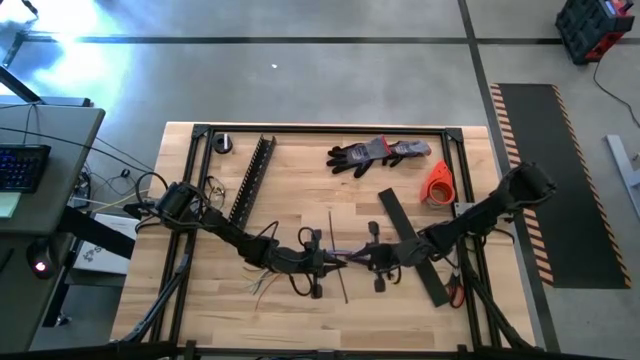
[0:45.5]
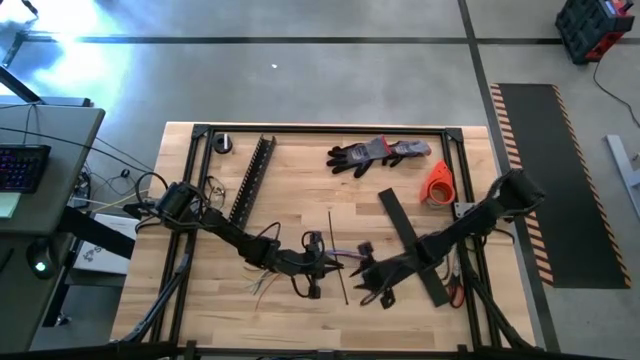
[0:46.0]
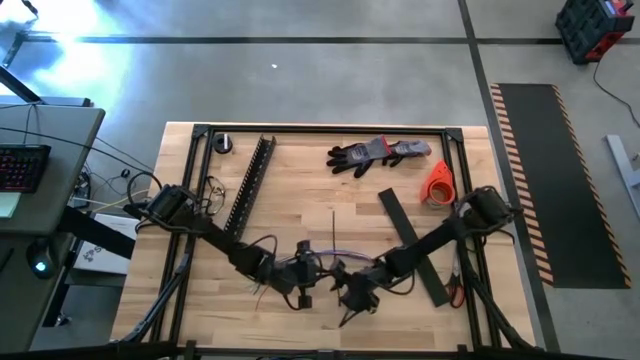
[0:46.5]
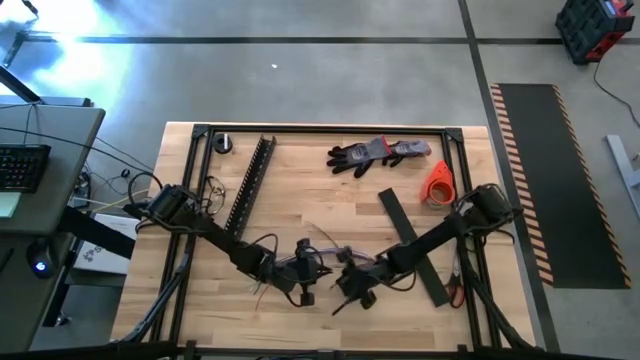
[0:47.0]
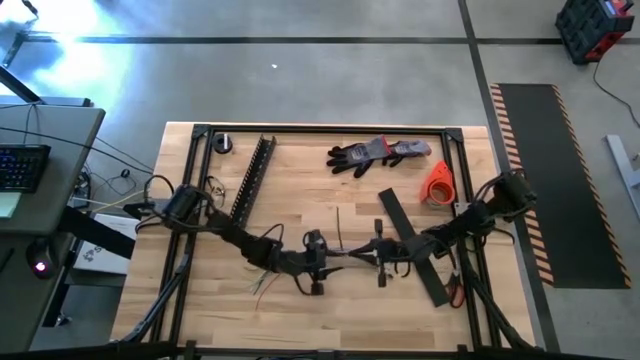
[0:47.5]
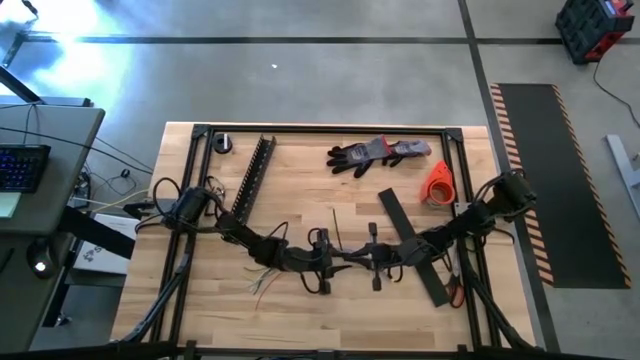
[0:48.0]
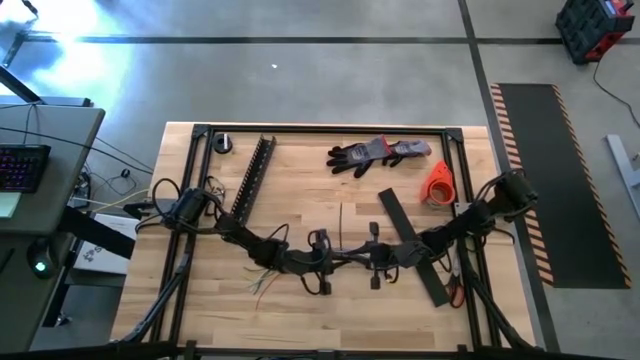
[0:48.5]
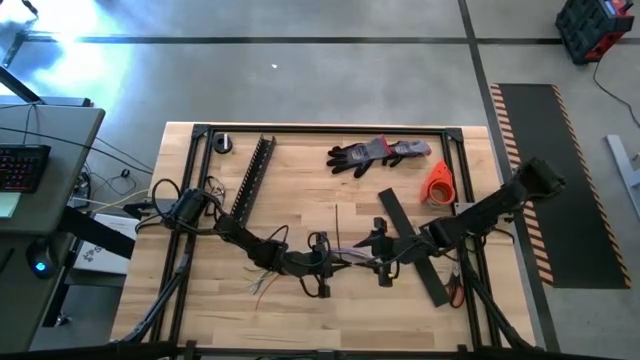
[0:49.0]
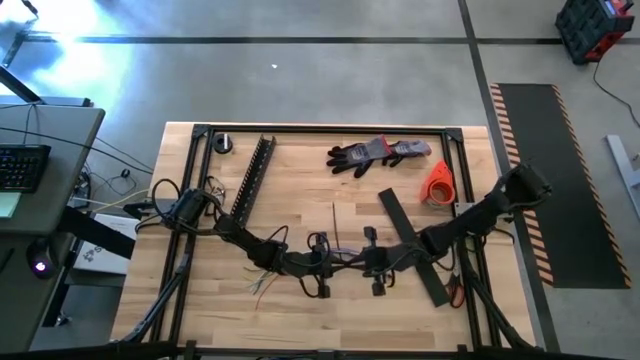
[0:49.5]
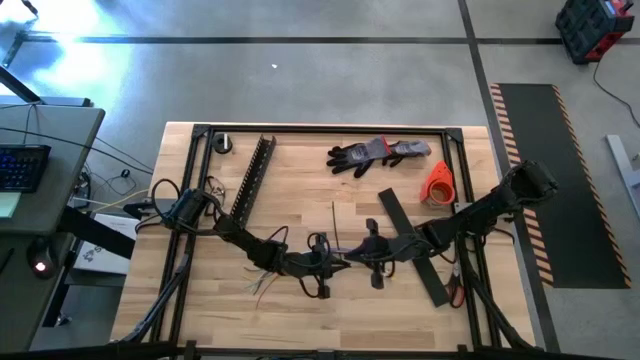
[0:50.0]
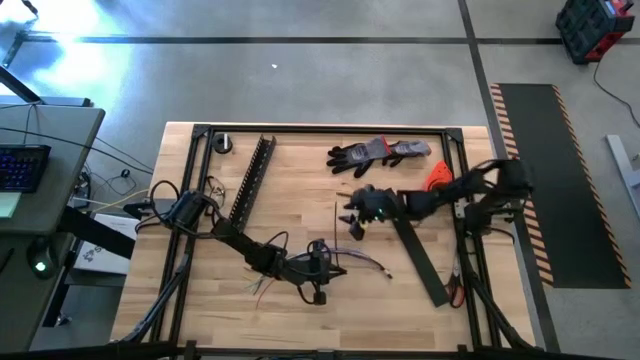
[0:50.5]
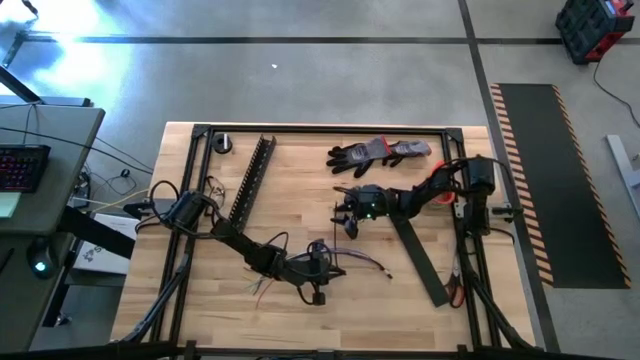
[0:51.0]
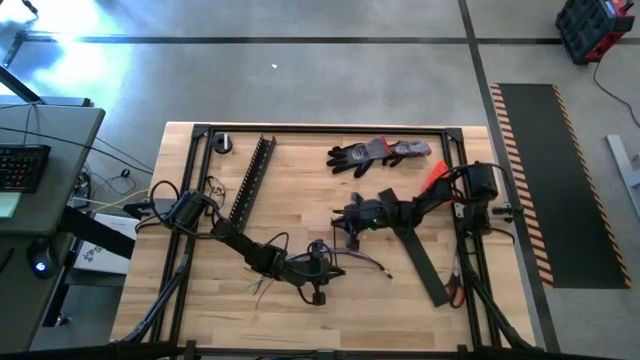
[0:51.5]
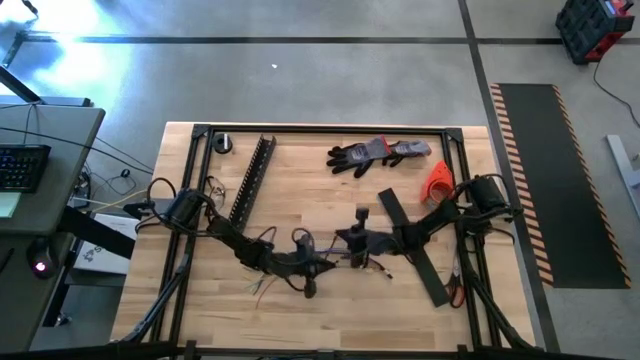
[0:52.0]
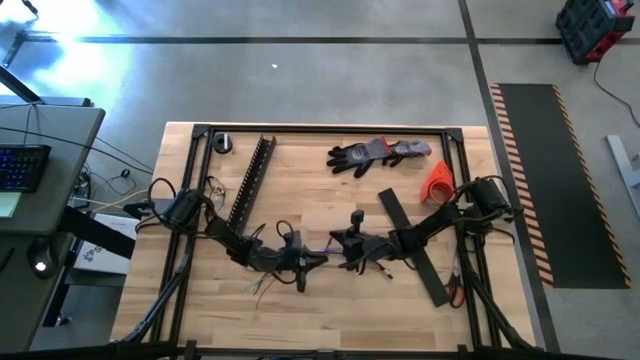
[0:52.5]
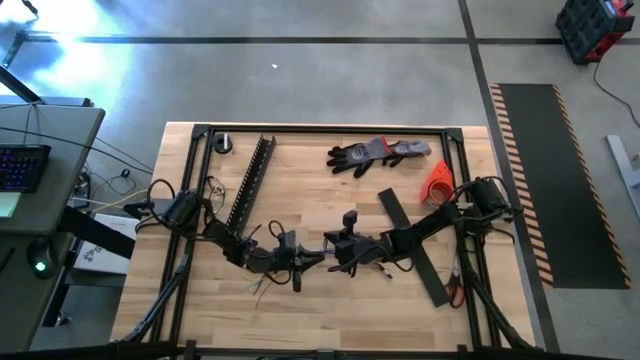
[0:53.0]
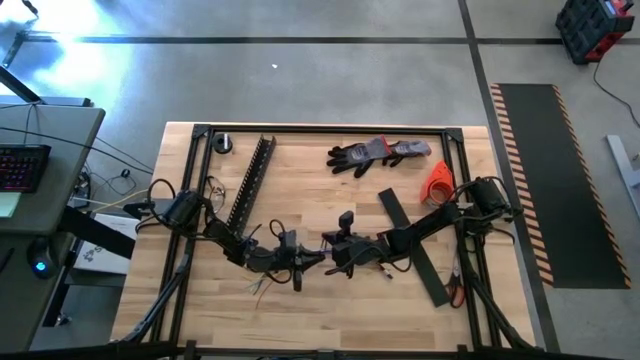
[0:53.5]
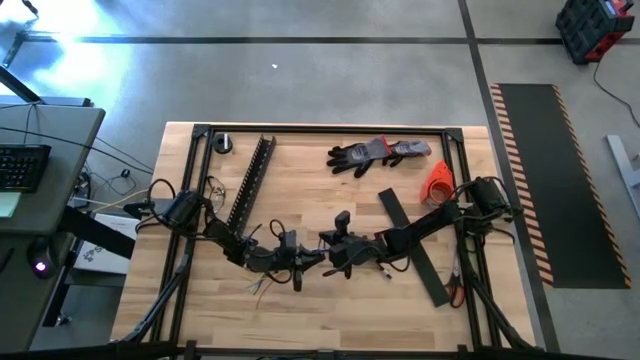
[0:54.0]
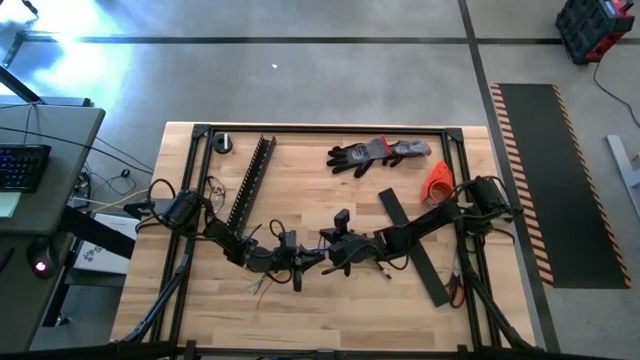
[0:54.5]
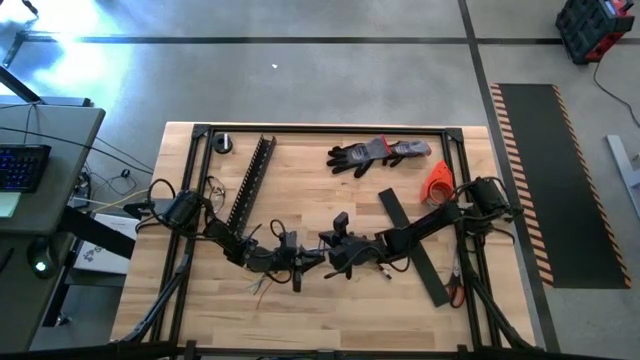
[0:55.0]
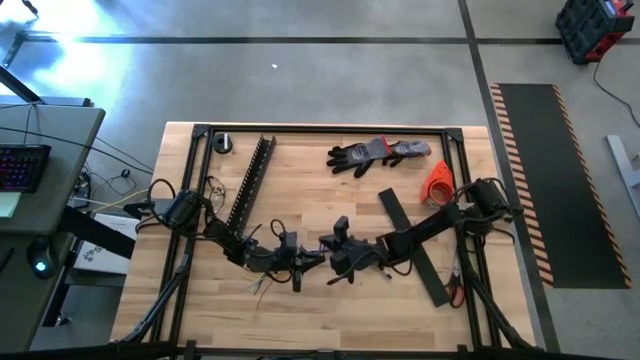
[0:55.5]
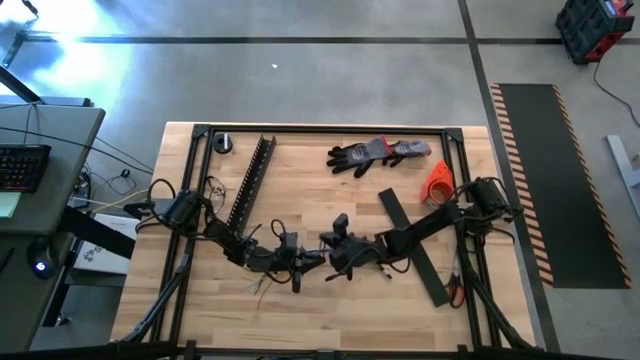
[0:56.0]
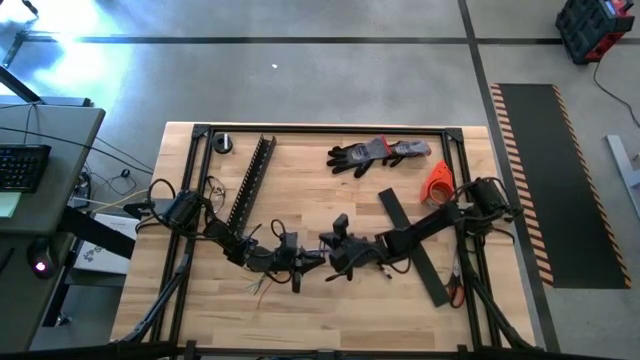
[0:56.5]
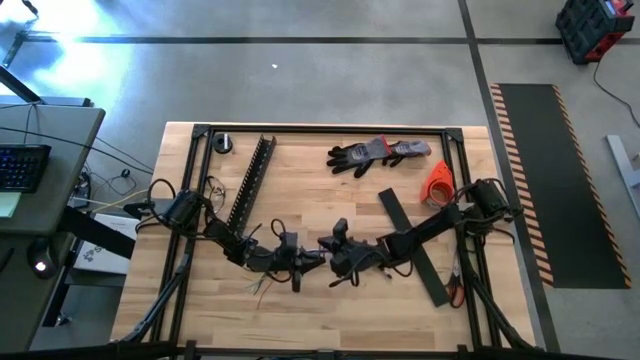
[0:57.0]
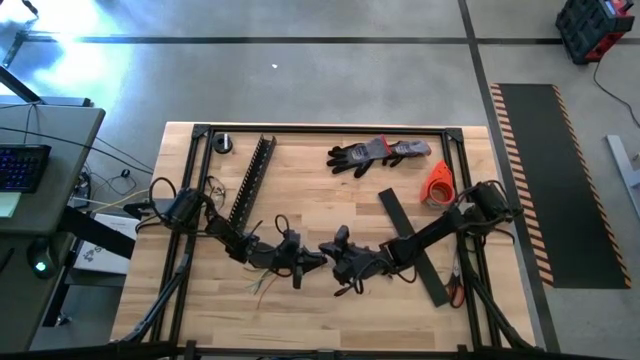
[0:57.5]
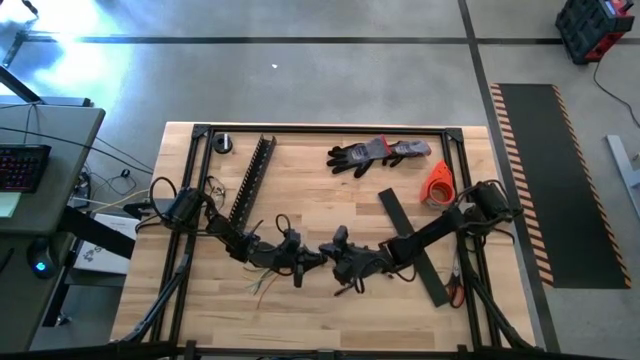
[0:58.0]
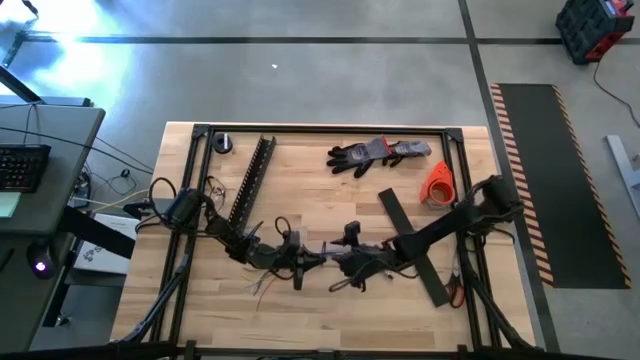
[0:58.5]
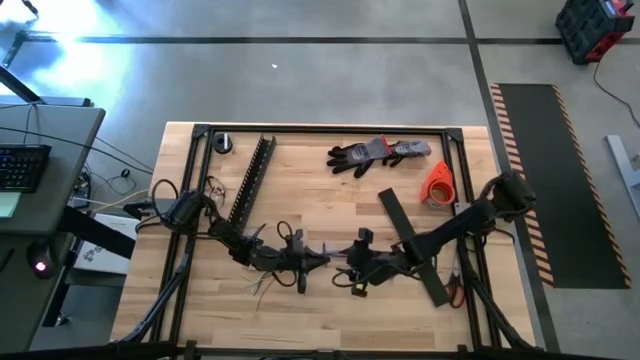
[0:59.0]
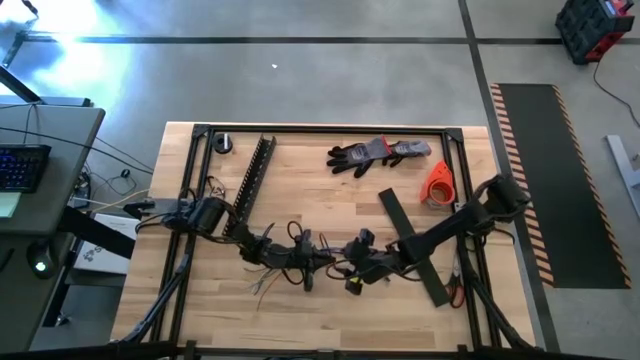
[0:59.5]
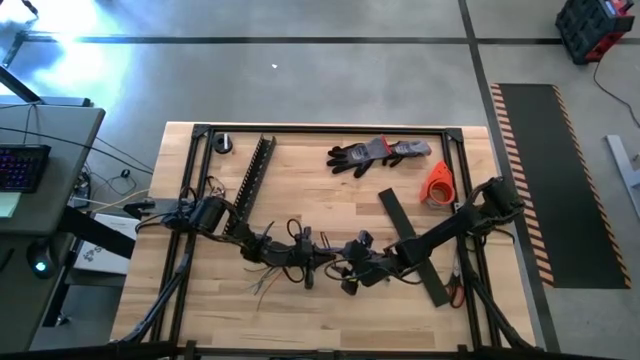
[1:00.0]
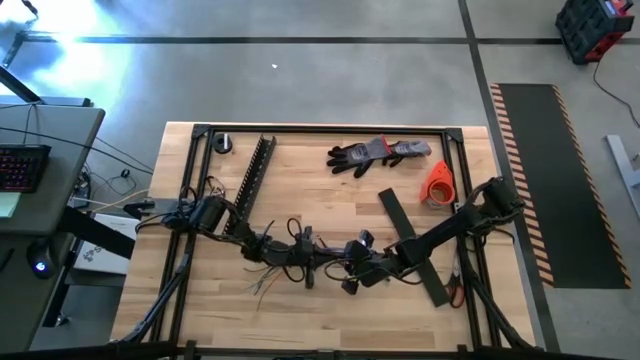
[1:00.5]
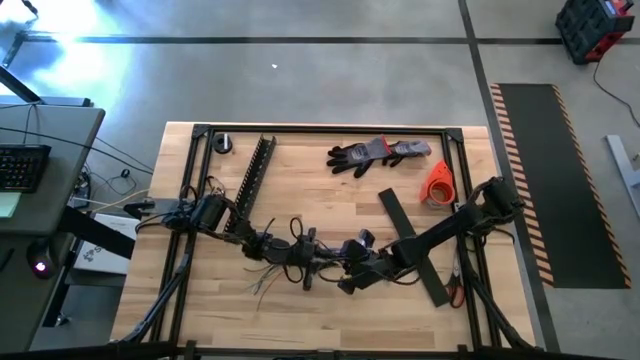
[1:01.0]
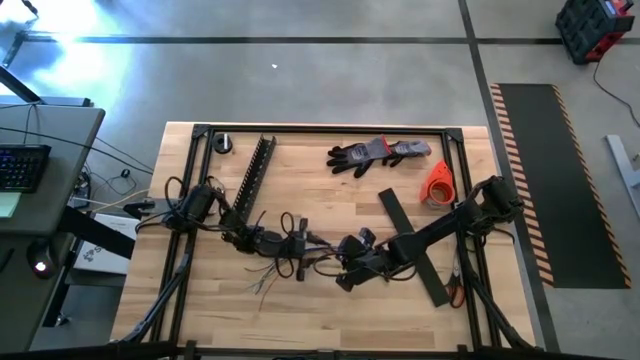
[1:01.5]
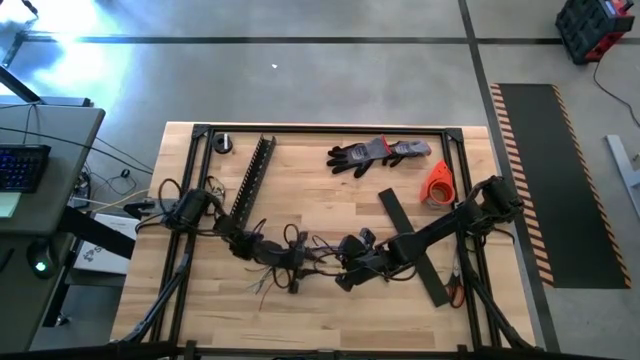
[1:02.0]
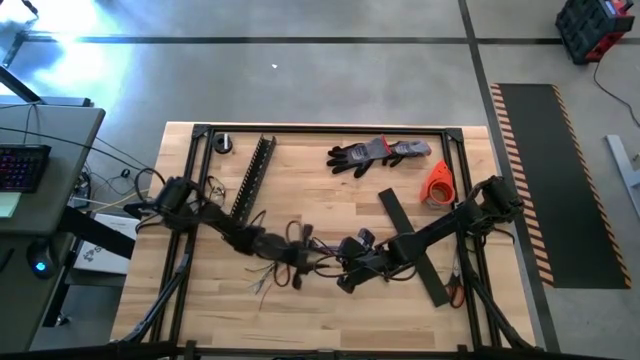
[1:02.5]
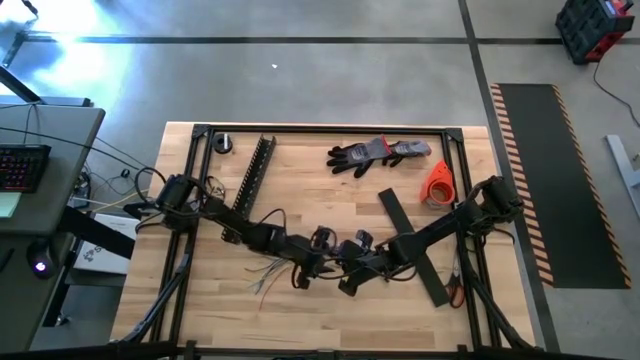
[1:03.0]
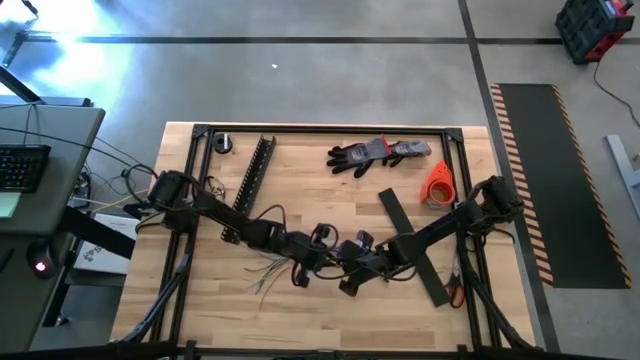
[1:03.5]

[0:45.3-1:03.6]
Task: Ziptie cables
Wrap the cables wires with the black zip tie

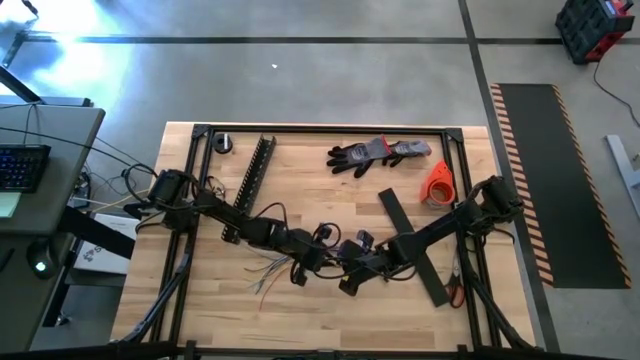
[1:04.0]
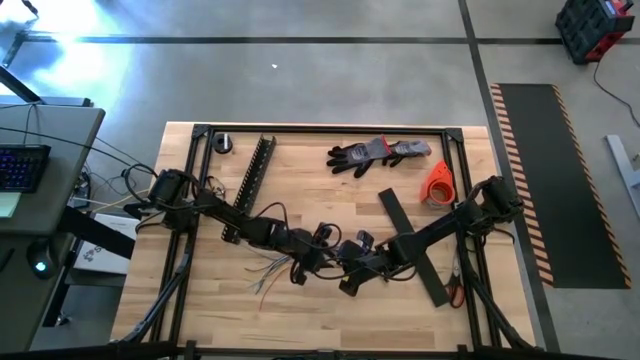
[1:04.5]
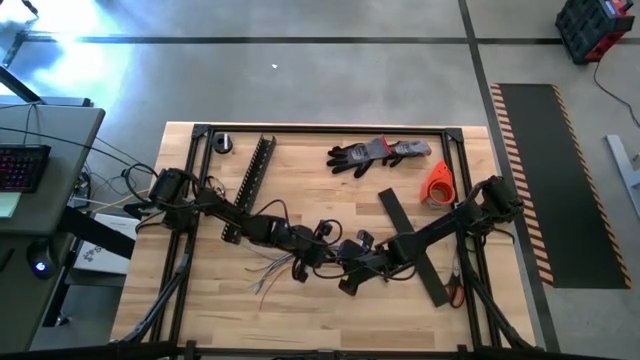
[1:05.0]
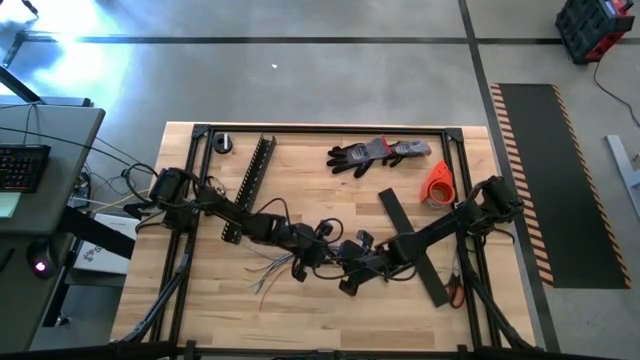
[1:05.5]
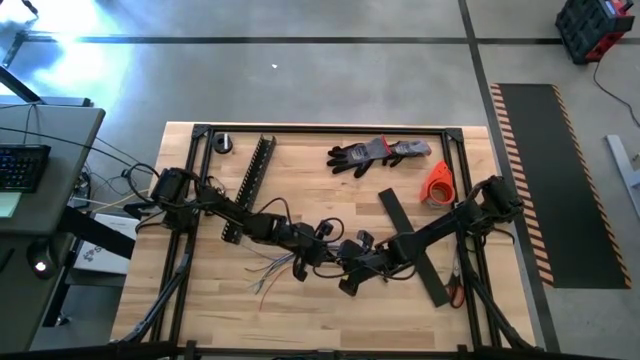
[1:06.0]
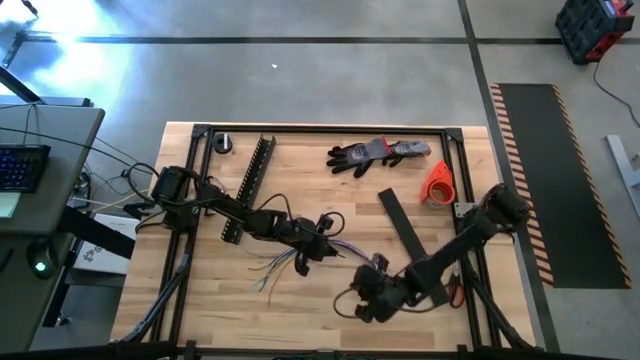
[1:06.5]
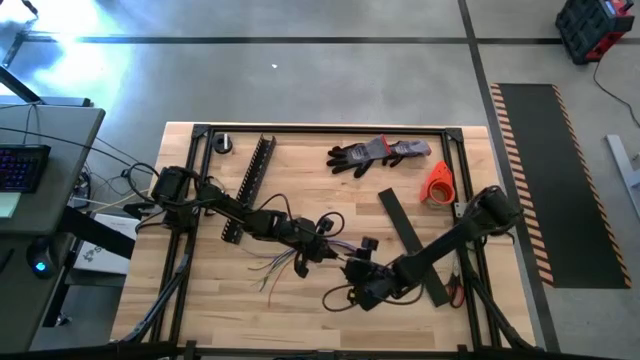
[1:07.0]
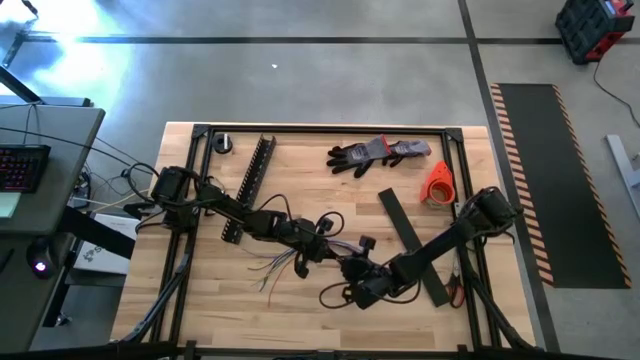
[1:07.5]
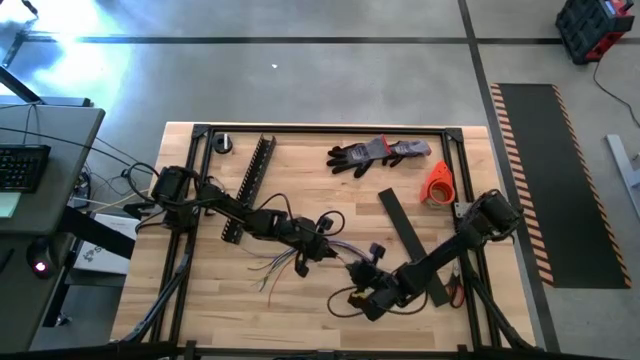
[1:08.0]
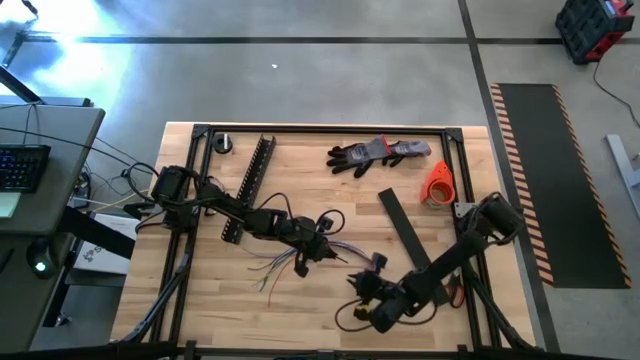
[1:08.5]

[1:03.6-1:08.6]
Wrap the cables wires with the black zip tie
